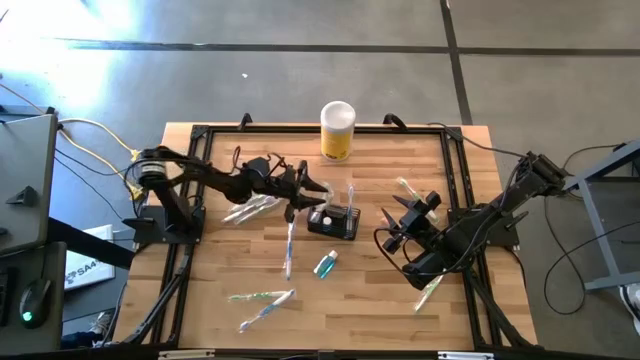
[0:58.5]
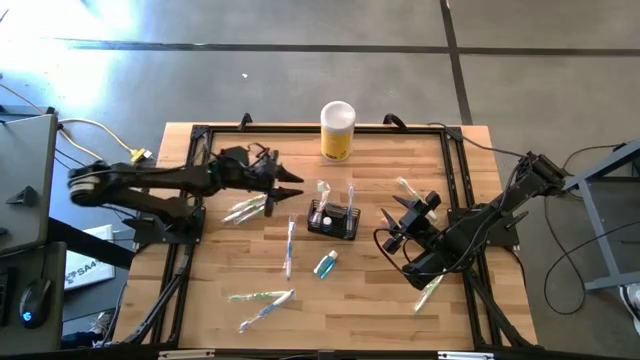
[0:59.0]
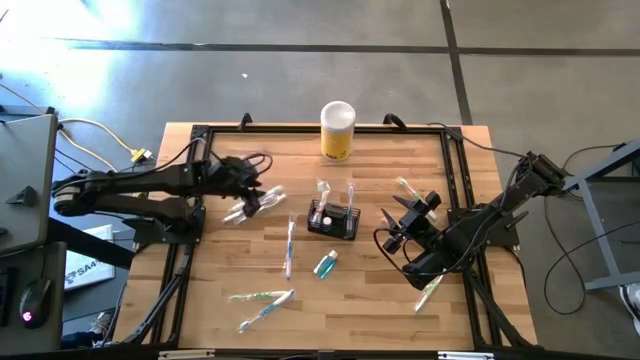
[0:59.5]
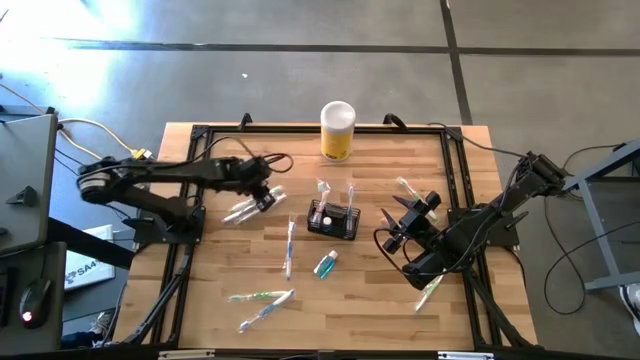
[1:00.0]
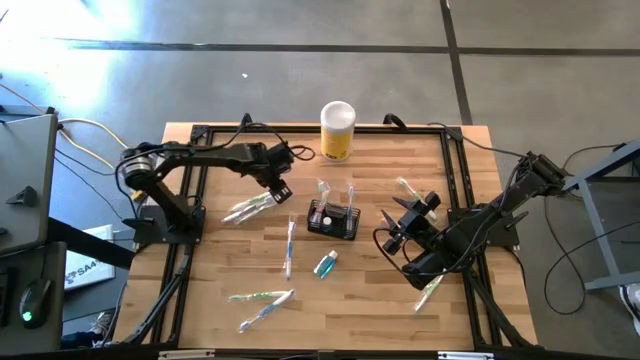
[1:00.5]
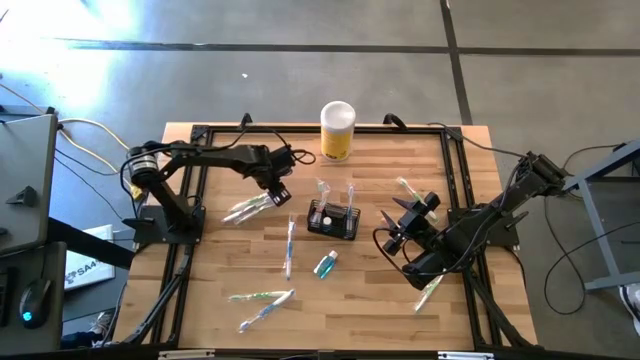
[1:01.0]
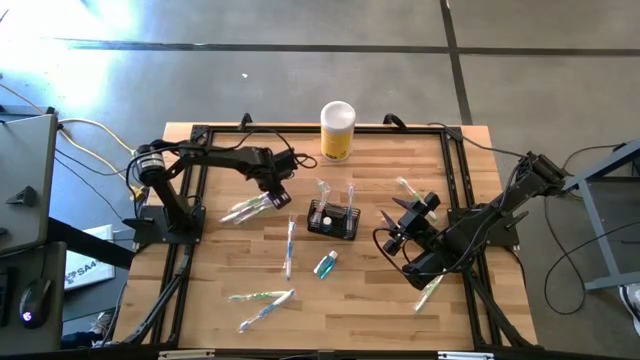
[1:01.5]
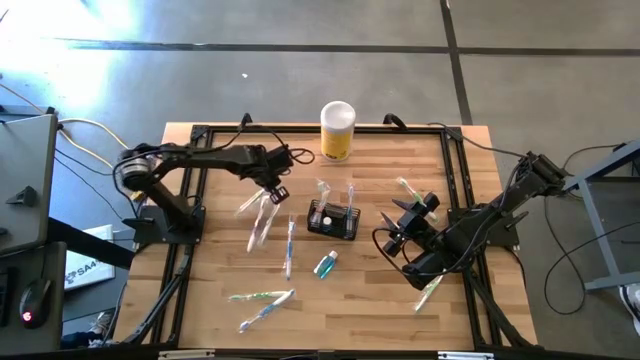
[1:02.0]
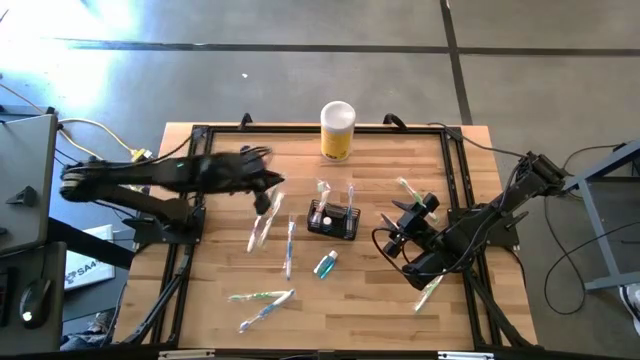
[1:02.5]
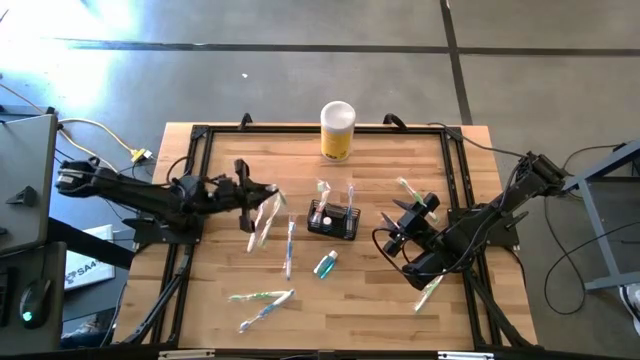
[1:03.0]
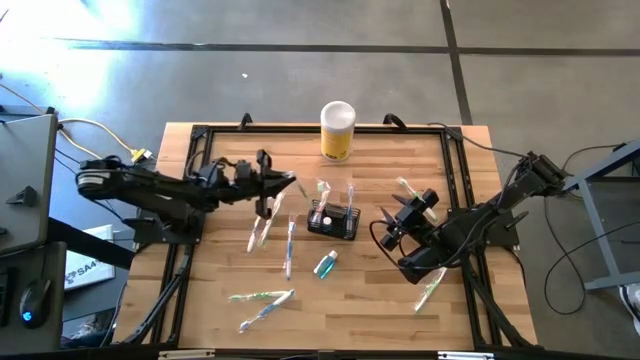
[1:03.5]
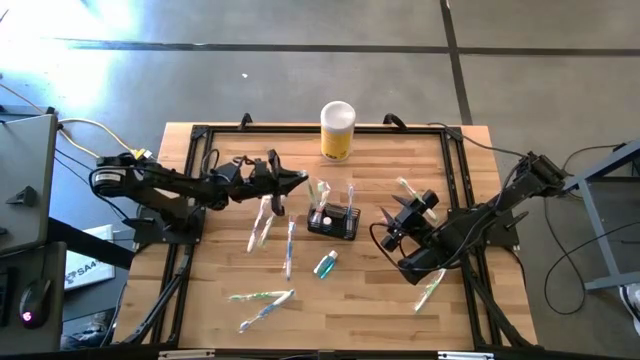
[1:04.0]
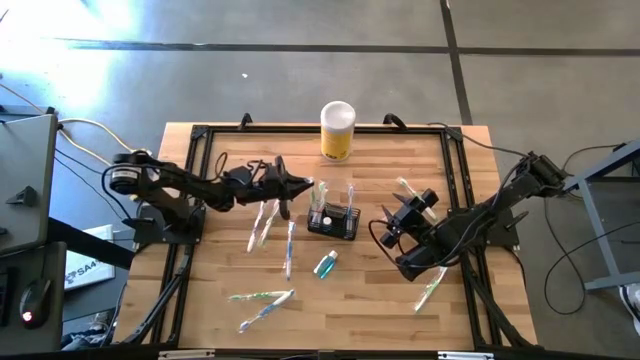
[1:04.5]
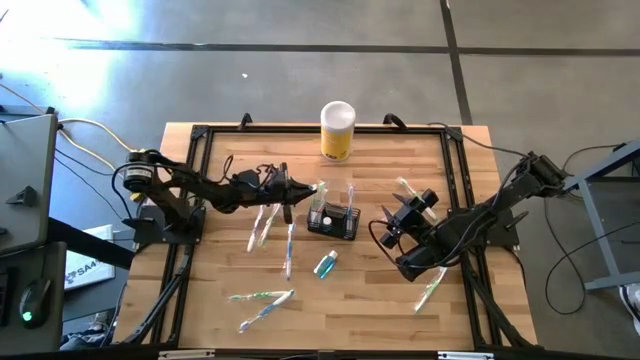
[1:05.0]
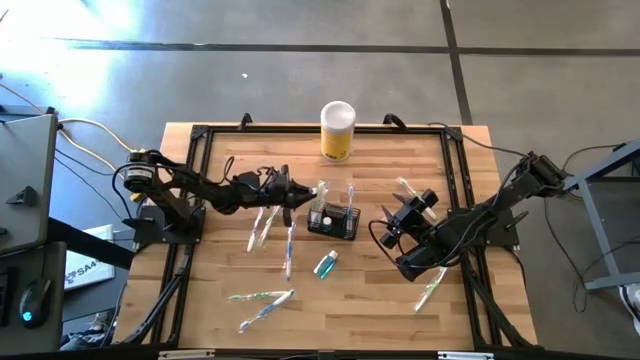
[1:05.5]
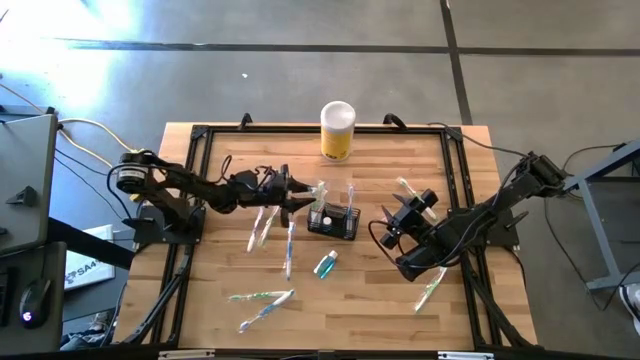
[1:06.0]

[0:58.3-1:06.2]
Task: Pick & Place toothbrushing station
Put the green toothbrush into the wire organizer

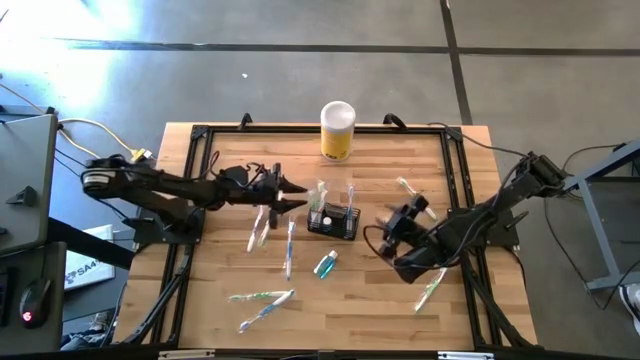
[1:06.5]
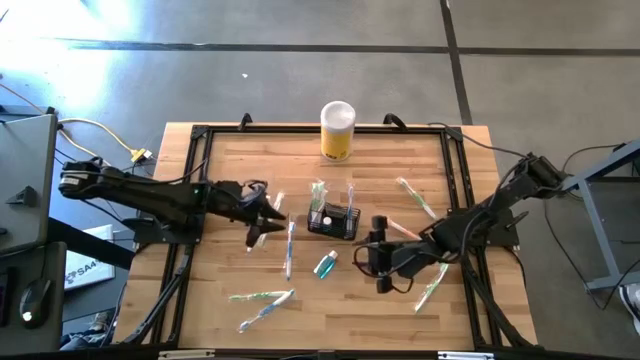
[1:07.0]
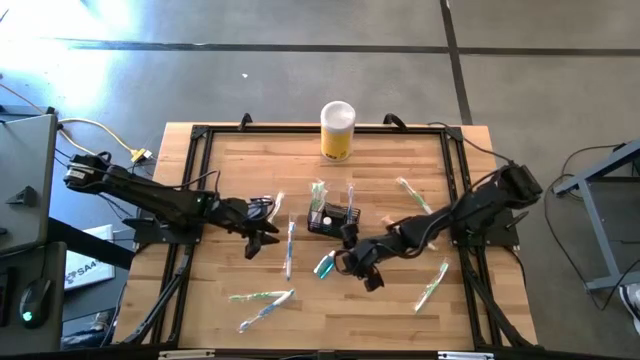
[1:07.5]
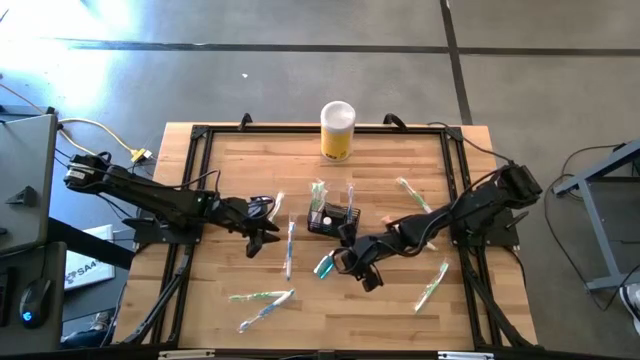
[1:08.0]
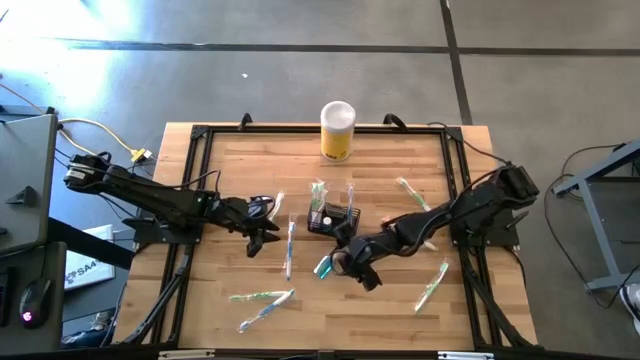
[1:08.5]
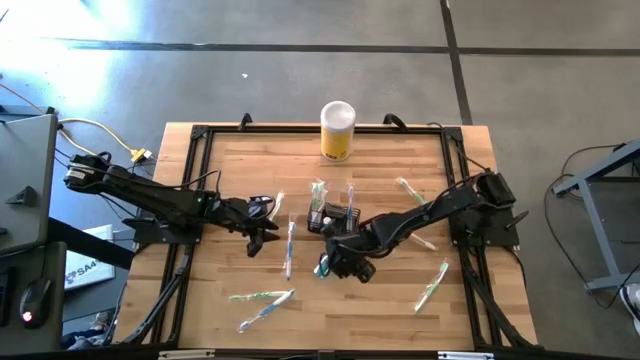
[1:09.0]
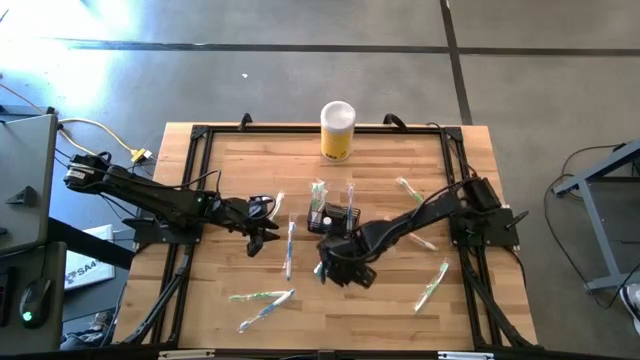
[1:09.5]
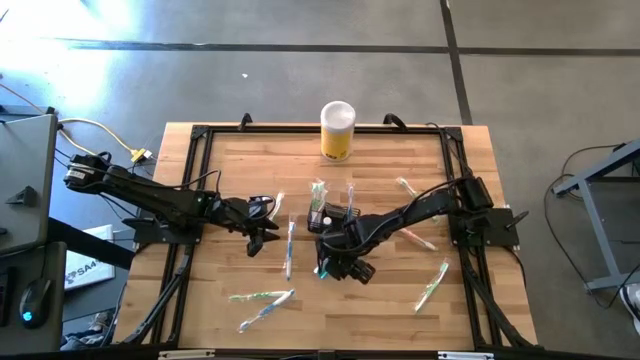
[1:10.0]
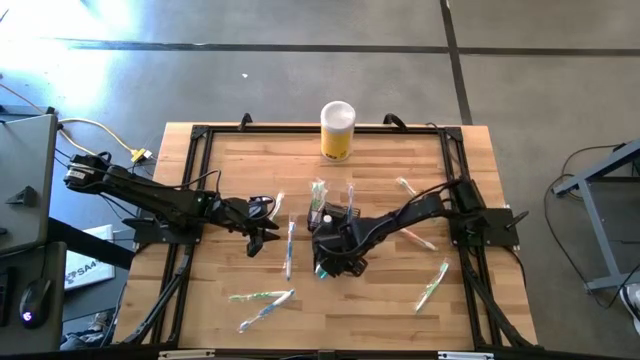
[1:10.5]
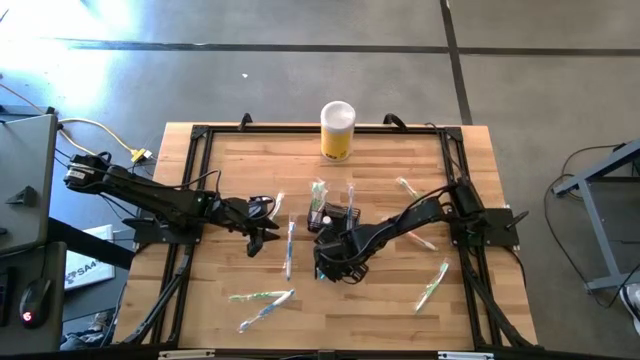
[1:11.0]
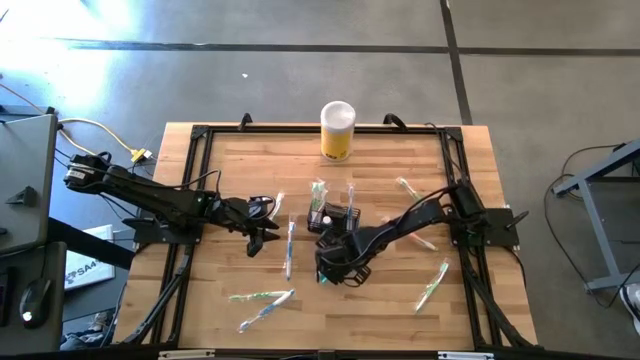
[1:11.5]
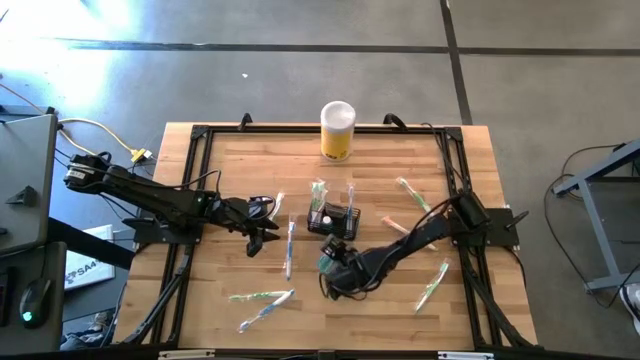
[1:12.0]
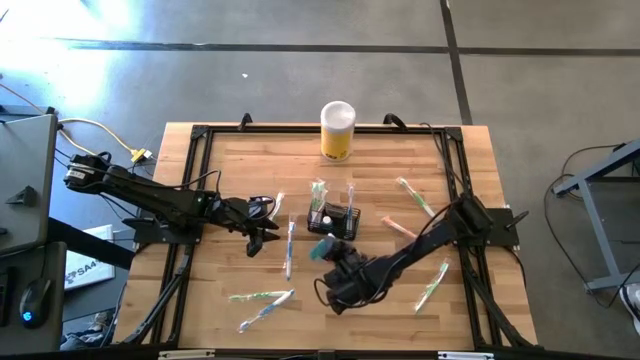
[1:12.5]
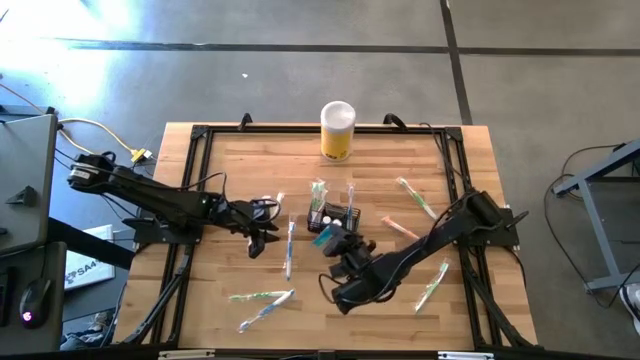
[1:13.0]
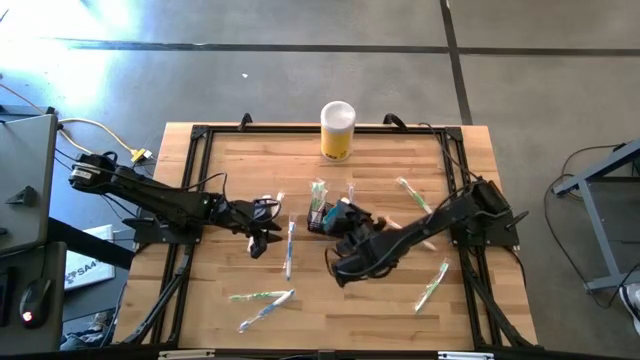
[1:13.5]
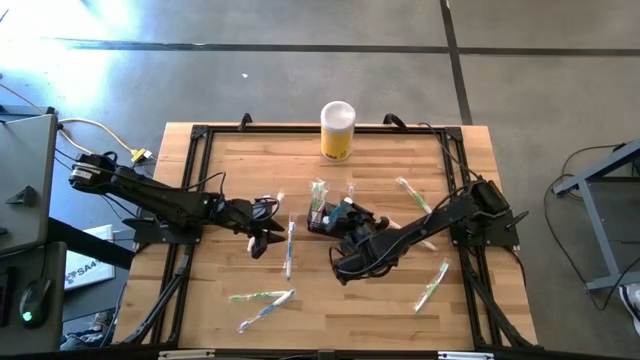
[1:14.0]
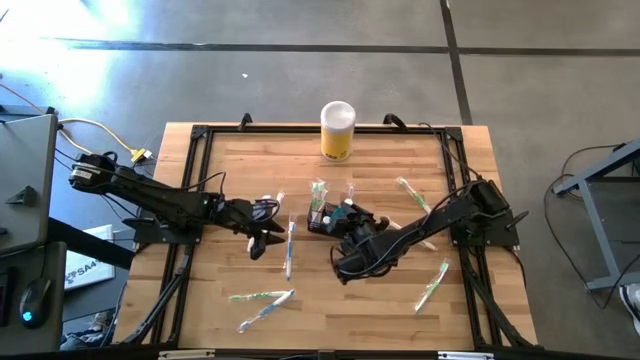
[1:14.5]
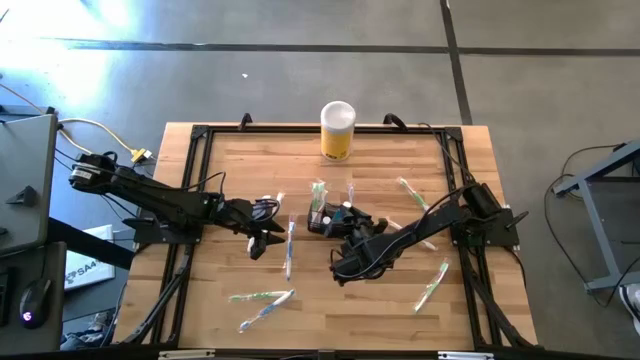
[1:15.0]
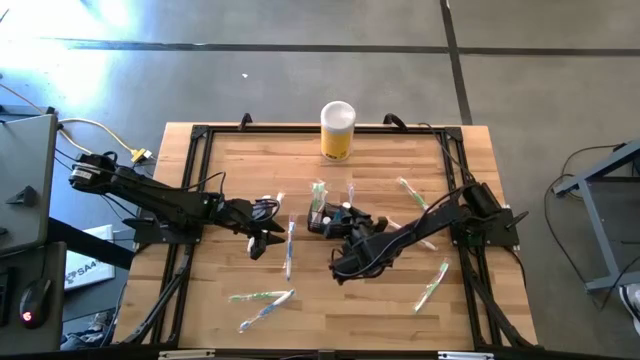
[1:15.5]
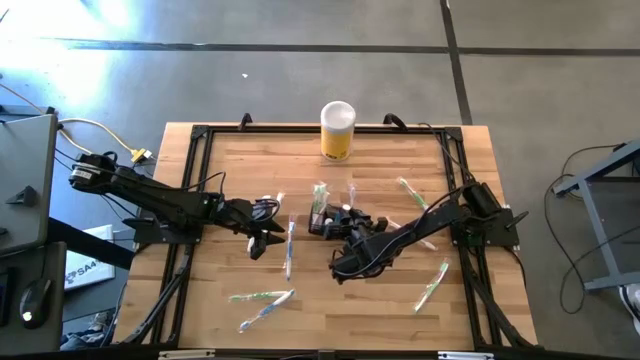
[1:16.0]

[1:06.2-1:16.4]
Put the blue mouthwash into the wire organizer

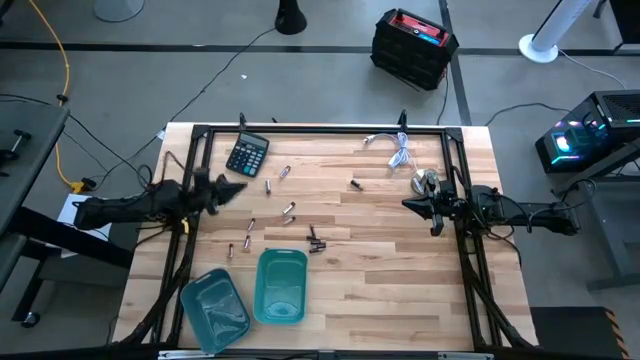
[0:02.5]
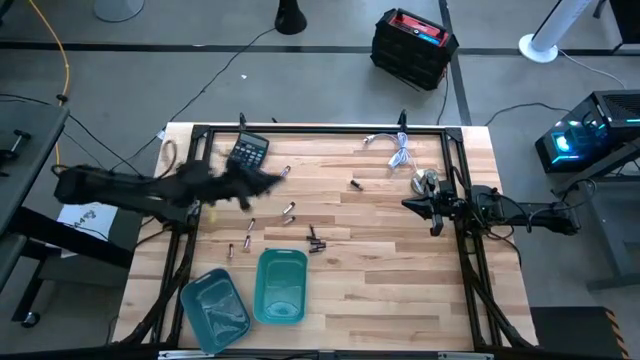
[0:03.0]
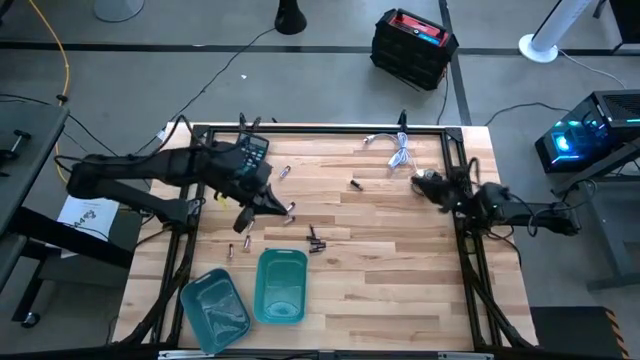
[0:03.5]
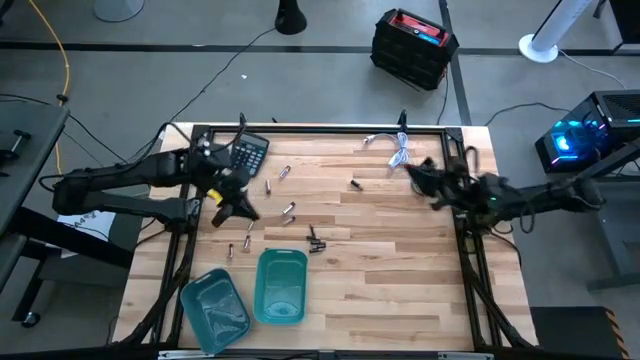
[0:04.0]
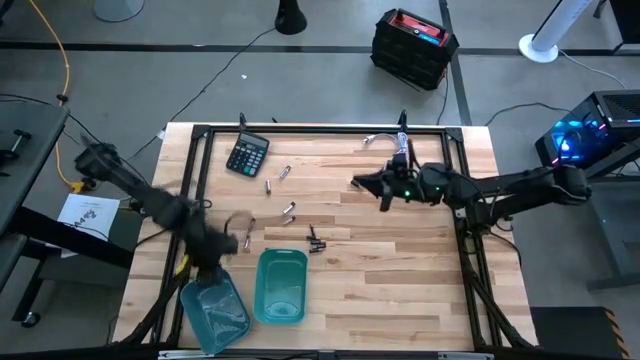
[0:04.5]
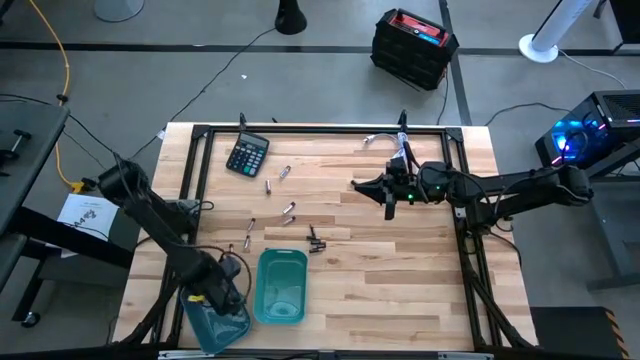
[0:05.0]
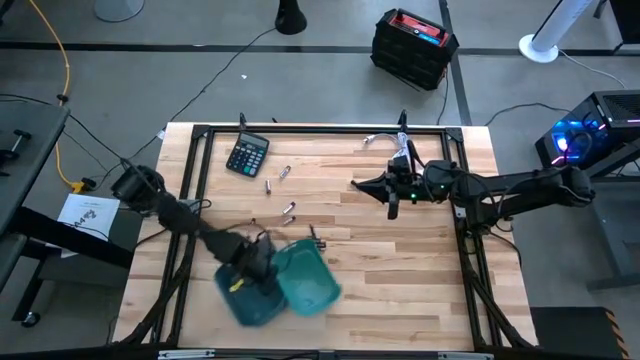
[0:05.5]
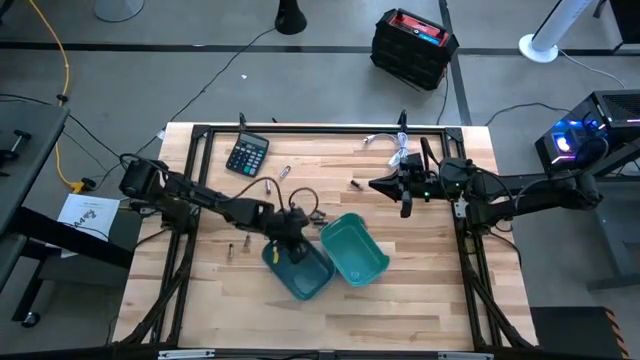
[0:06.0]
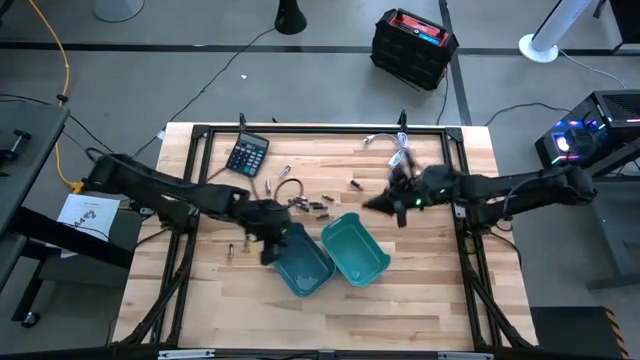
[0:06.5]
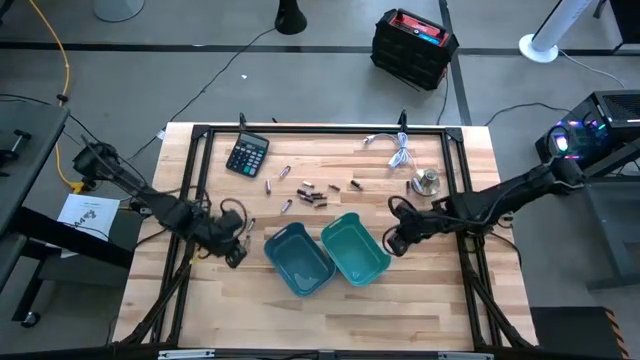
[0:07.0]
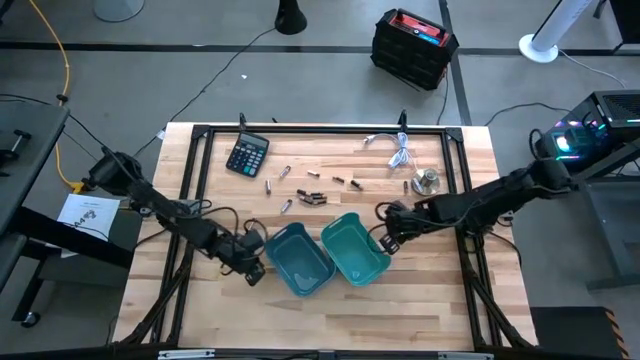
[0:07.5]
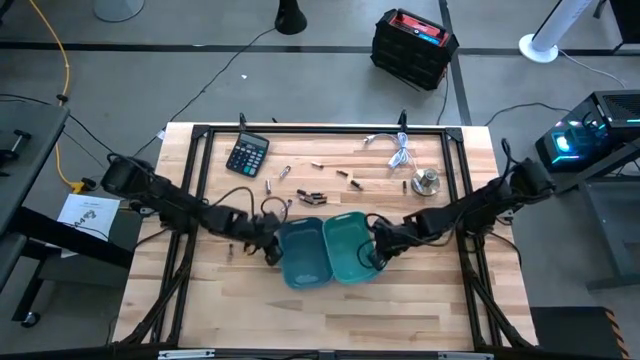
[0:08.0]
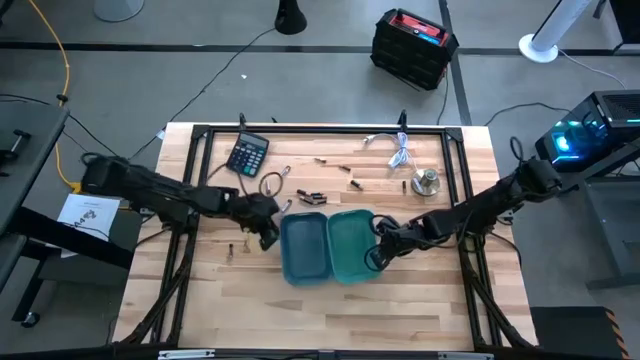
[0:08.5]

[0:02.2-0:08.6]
Task: Sort batteries
Move the bins to the center of the table
